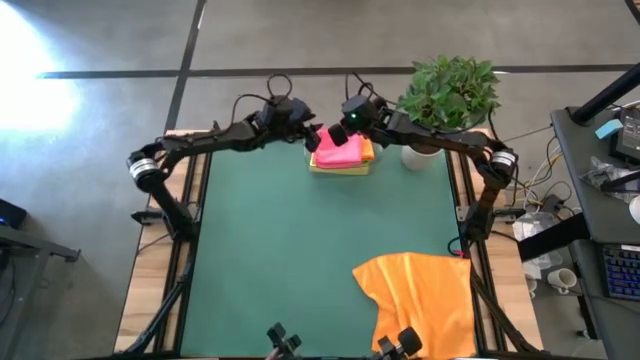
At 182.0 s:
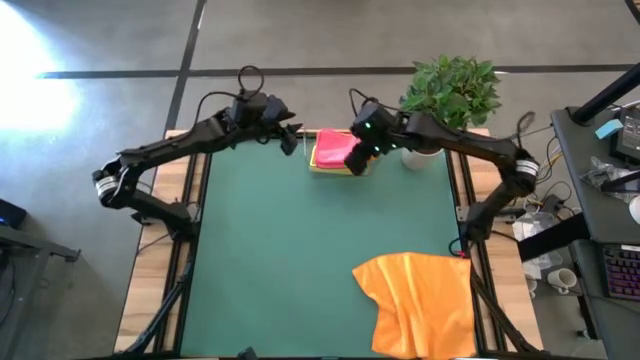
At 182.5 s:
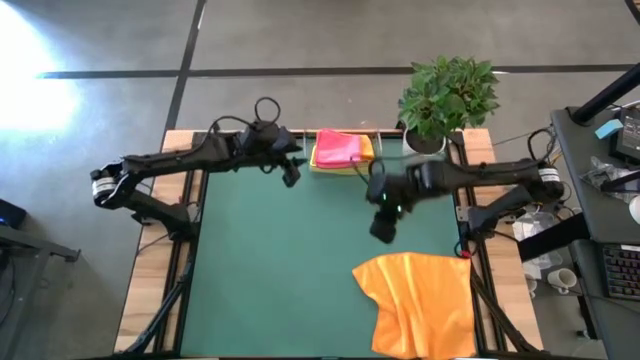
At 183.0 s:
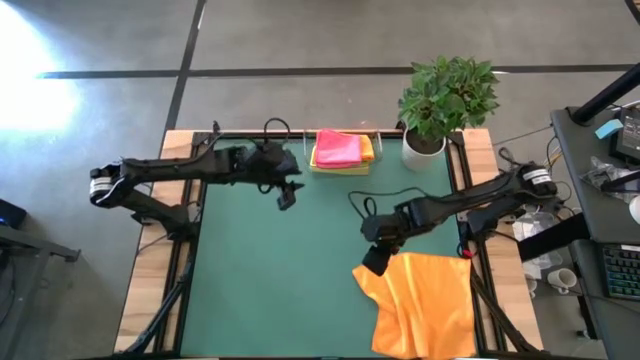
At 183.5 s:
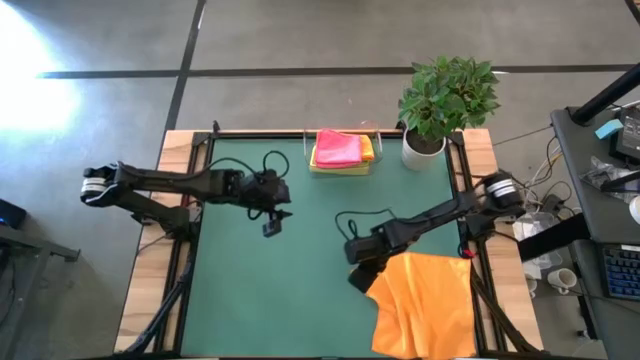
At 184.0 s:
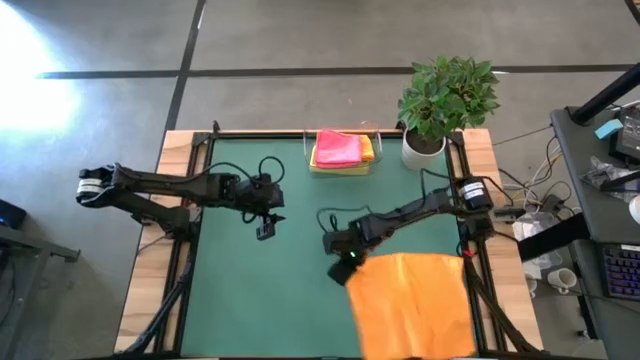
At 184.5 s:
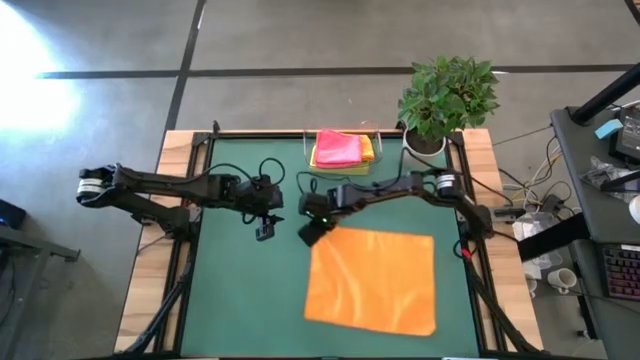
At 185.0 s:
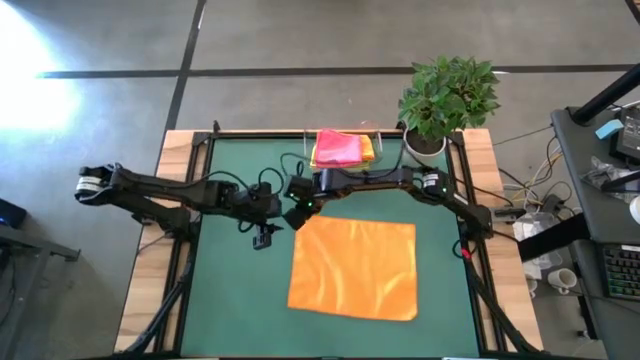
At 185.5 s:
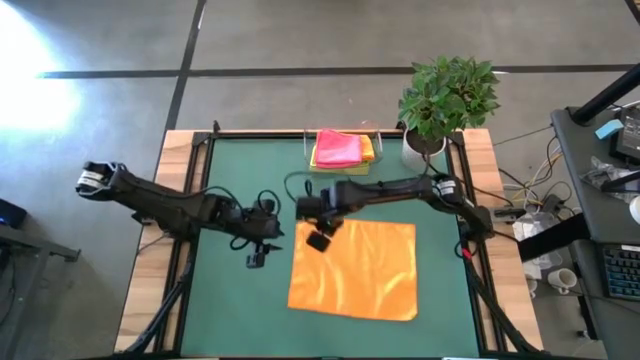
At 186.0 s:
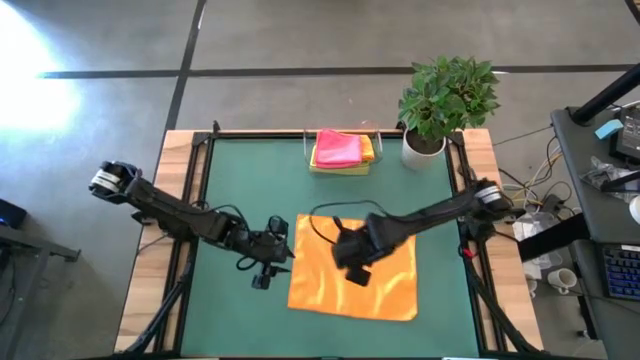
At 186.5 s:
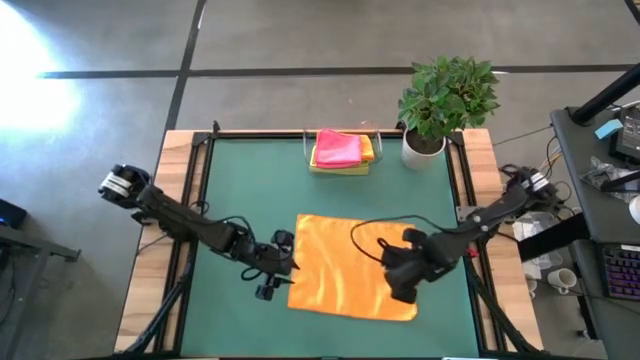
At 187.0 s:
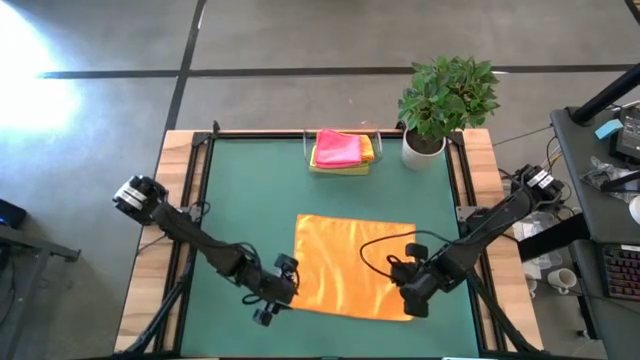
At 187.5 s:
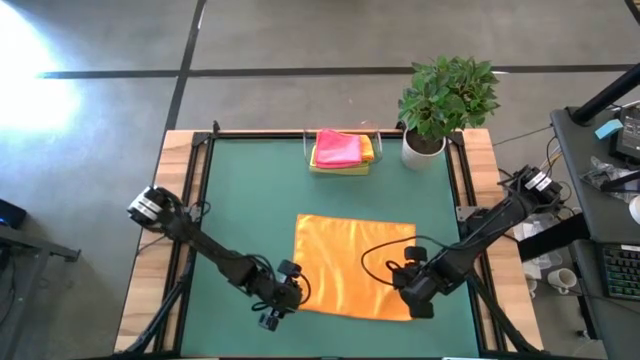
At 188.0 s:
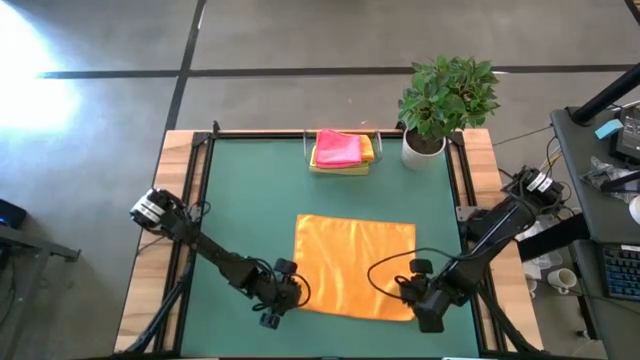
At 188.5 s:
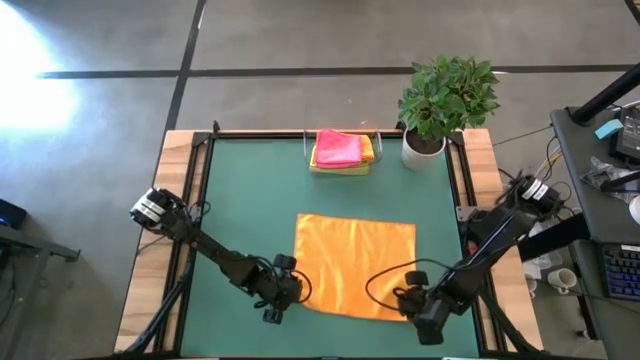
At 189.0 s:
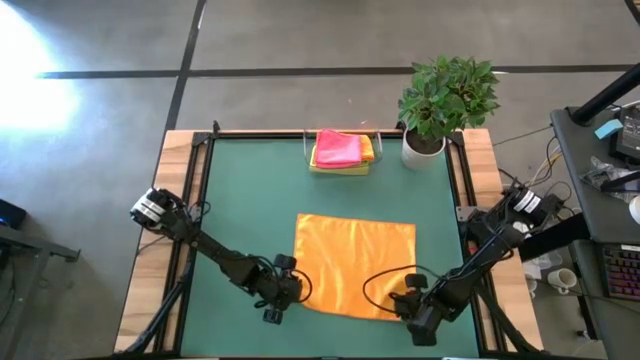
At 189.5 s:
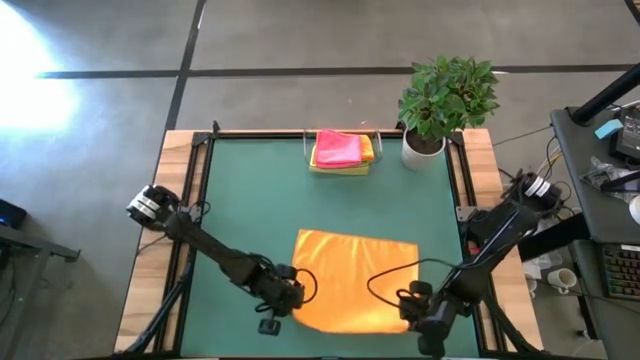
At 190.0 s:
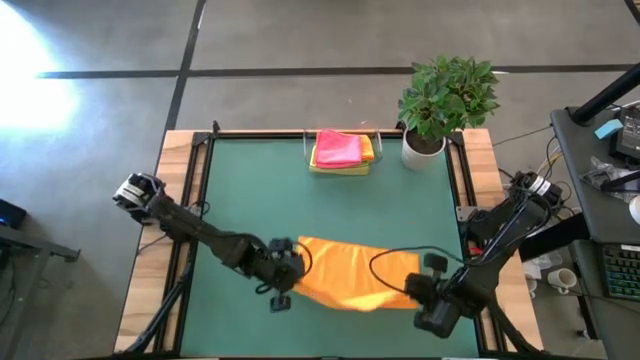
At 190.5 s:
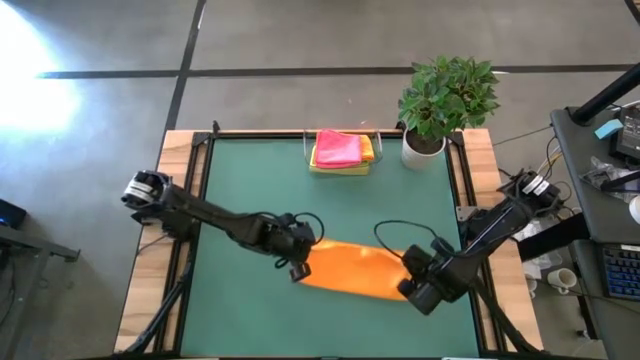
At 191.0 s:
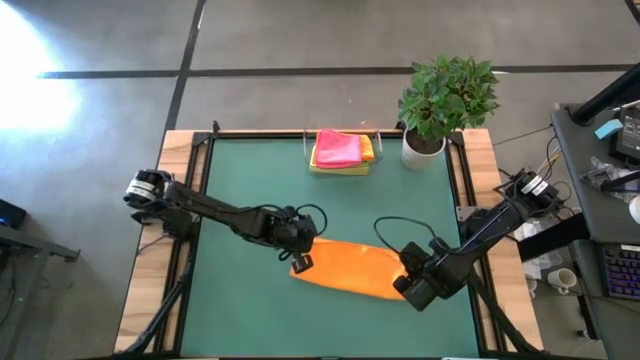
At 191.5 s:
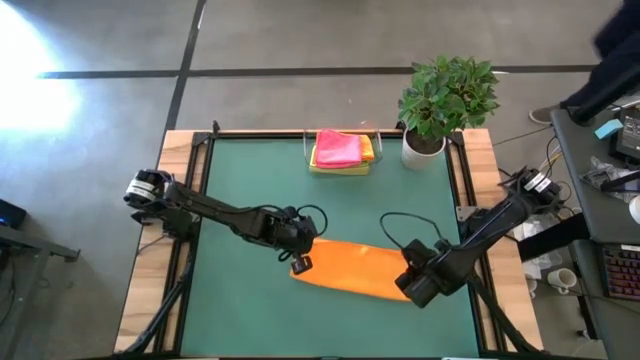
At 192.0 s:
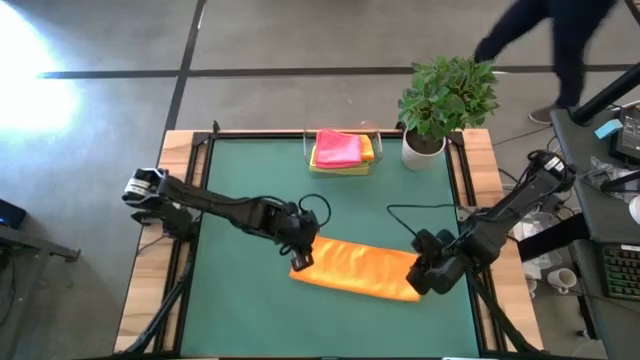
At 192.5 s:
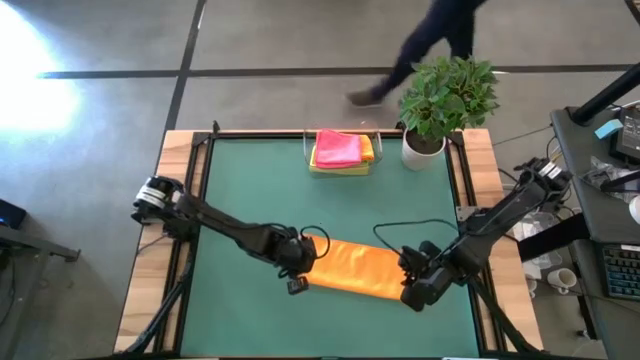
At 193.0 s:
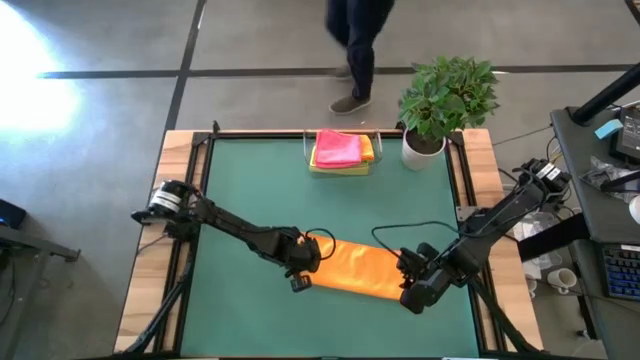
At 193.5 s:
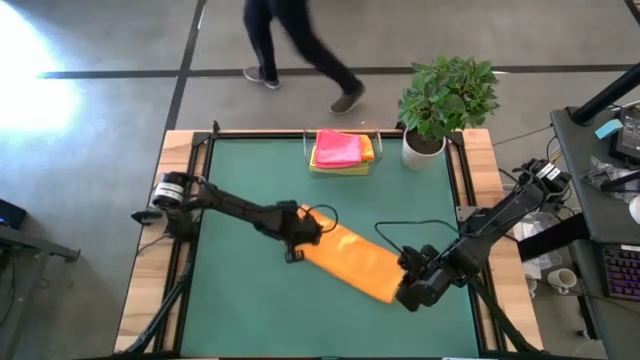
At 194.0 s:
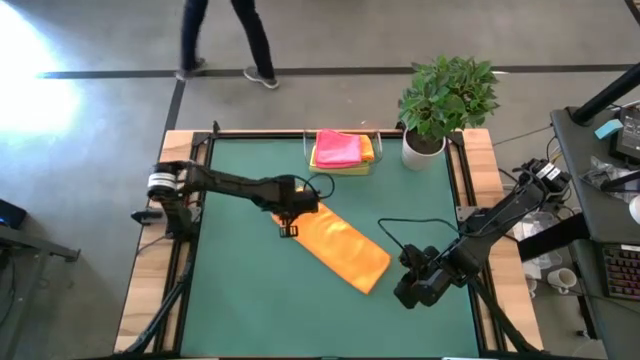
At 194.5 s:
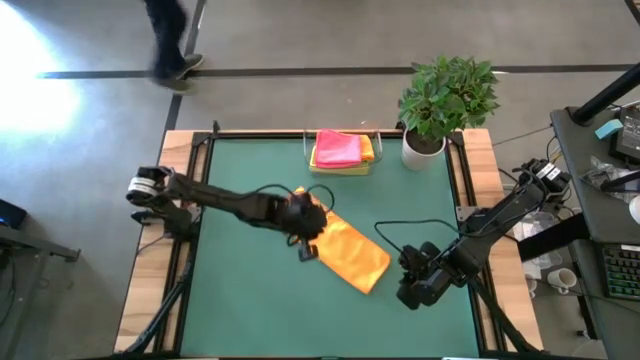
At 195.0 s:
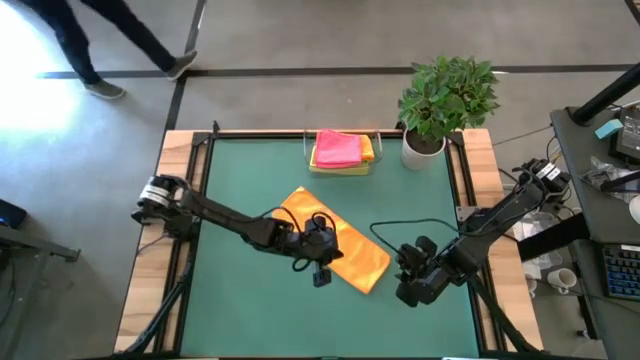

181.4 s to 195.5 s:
Task: Fold microfiber towels
Fold the orange towel

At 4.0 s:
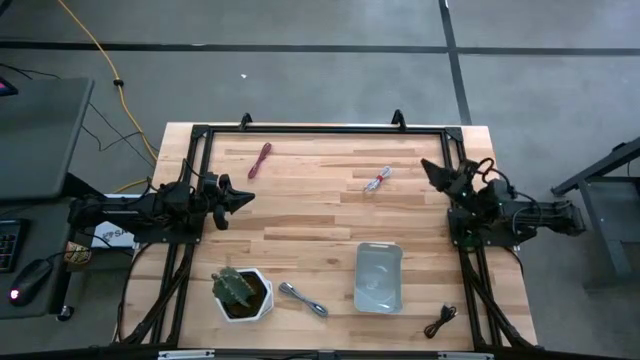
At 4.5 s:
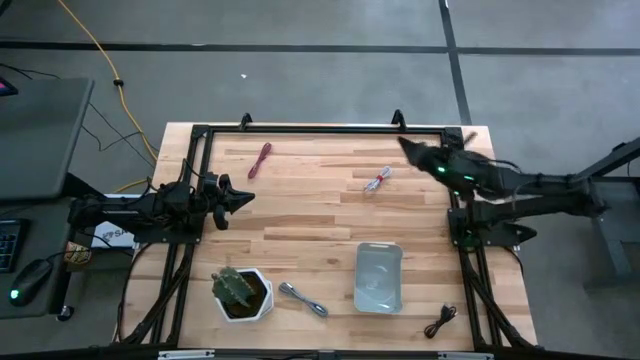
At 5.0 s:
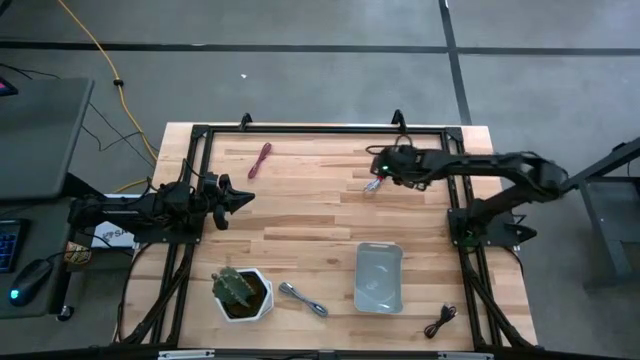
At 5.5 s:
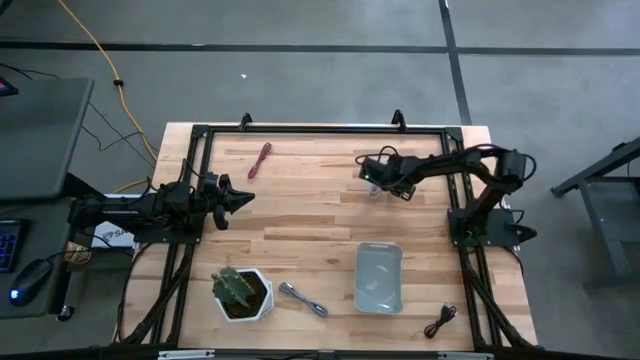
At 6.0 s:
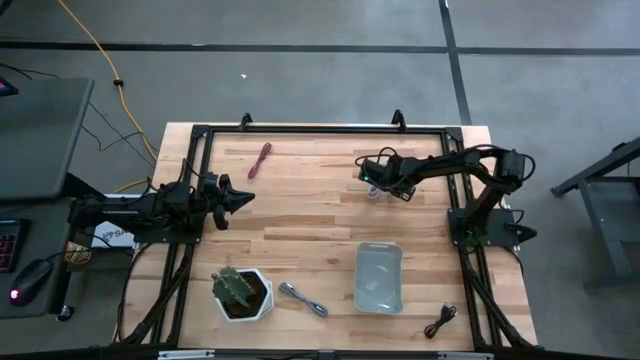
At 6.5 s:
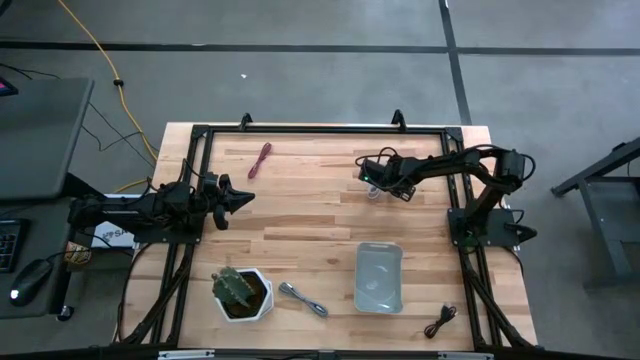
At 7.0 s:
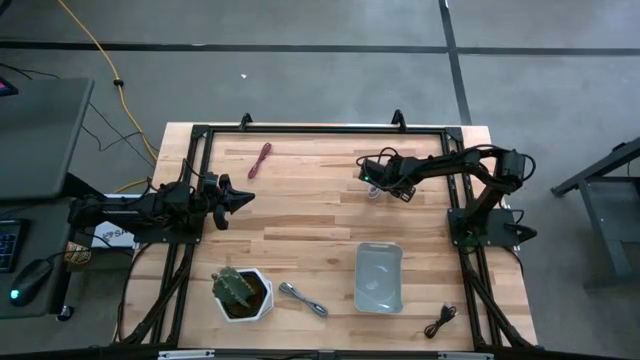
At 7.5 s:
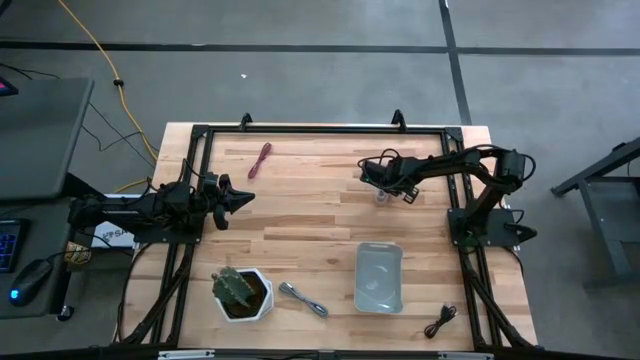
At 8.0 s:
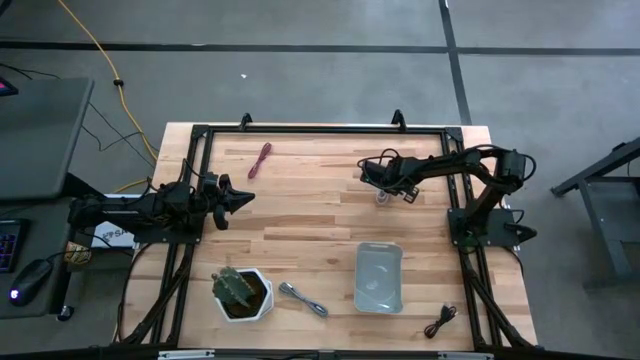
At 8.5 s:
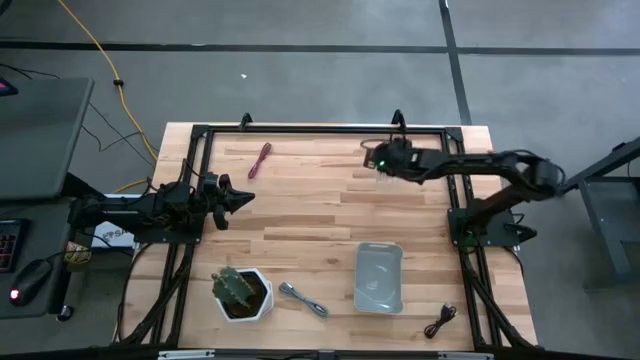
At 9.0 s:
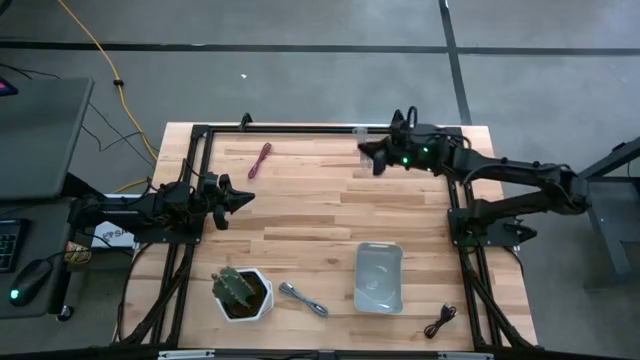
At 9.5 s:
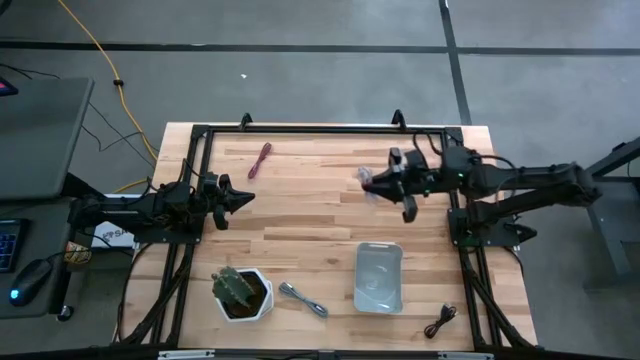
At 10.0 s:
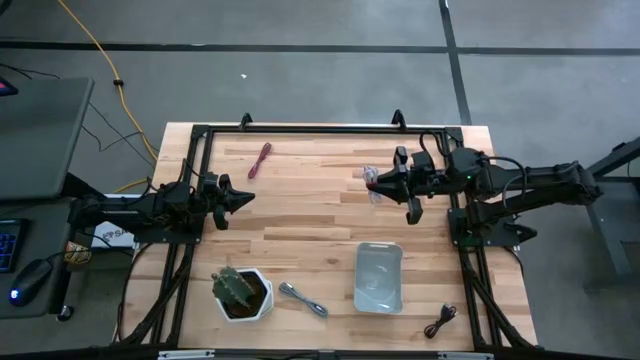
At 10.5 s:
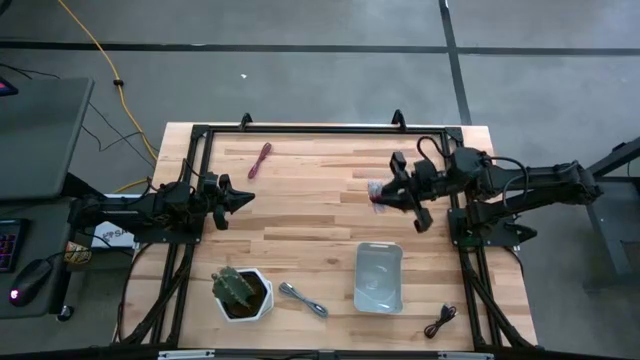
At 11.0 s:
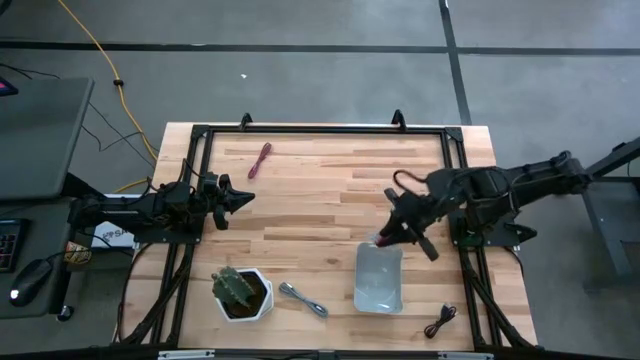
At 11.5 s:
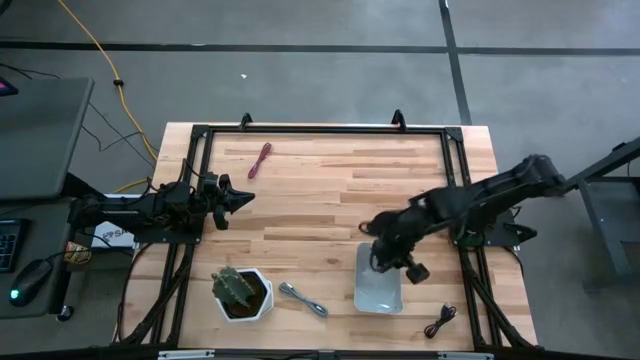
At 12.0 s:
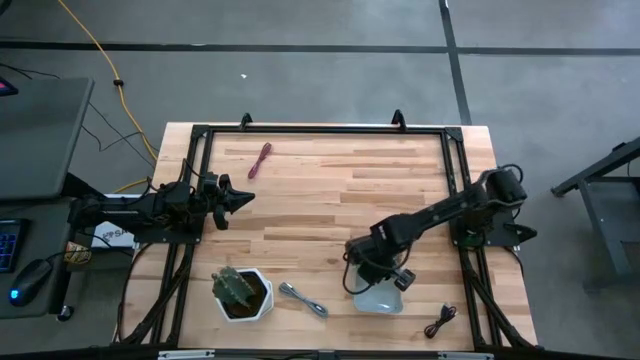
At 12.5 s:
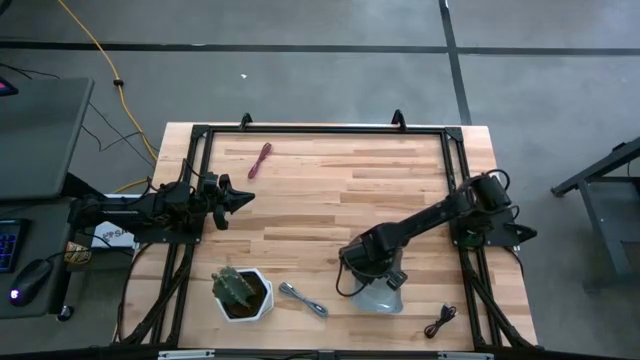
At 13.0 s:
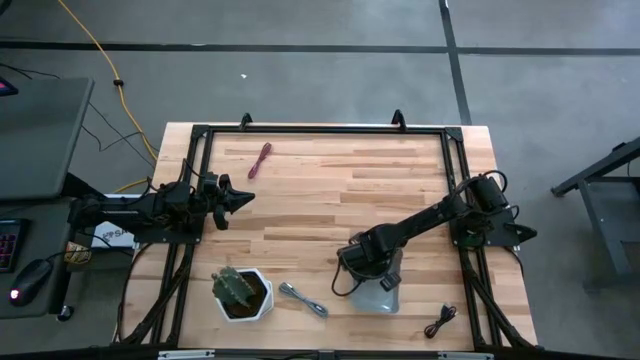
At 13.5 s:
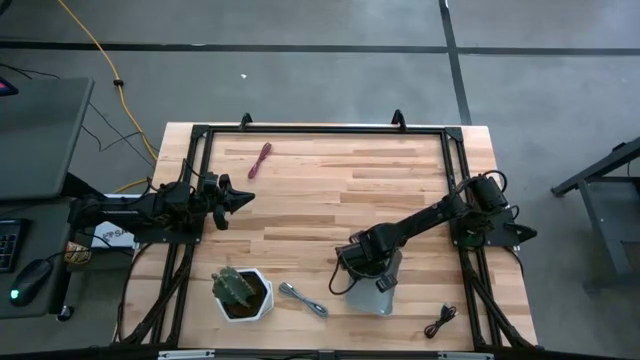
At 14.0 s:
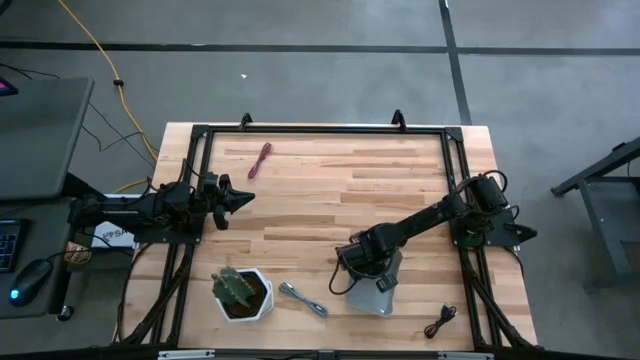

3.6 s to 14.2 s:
Task: Pick and place USB-C Cables
Put the white charger cable into the gray bin
